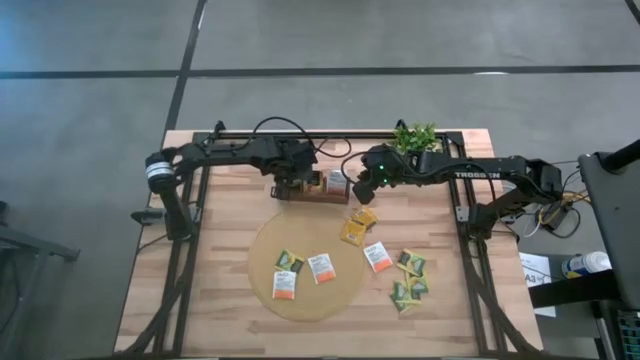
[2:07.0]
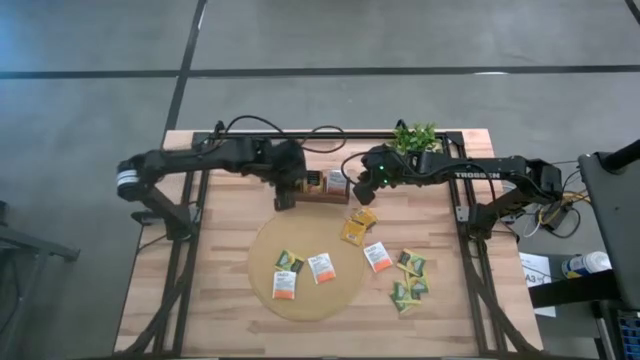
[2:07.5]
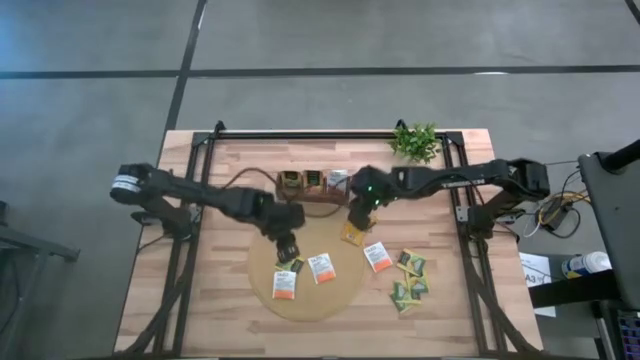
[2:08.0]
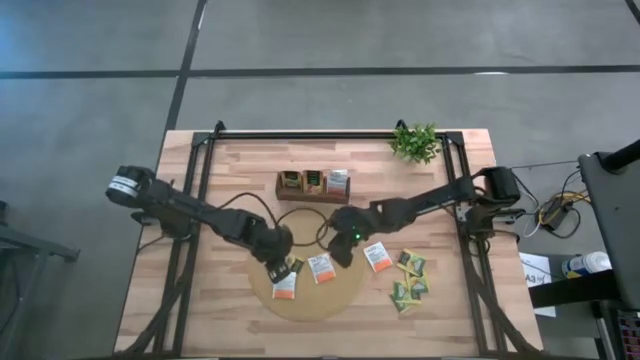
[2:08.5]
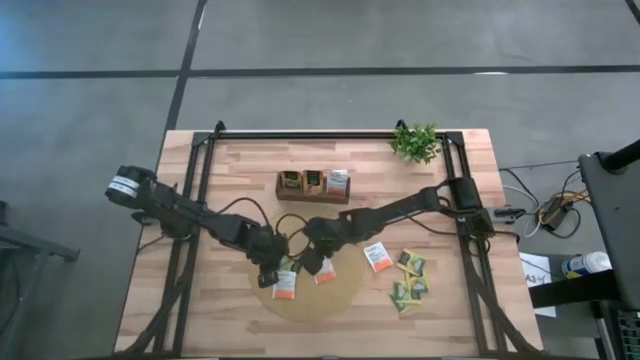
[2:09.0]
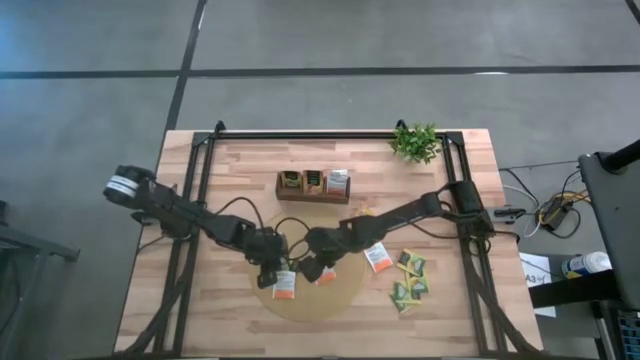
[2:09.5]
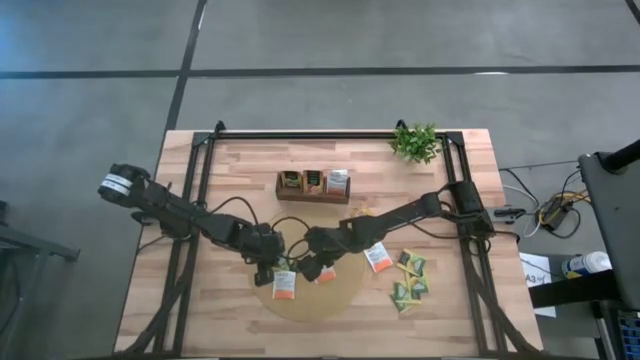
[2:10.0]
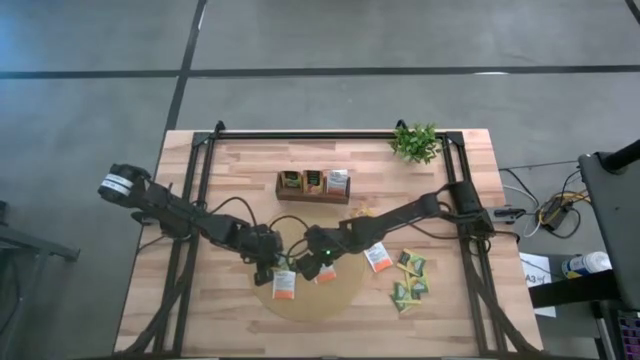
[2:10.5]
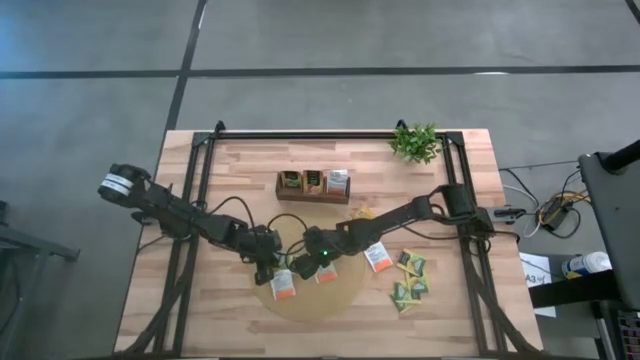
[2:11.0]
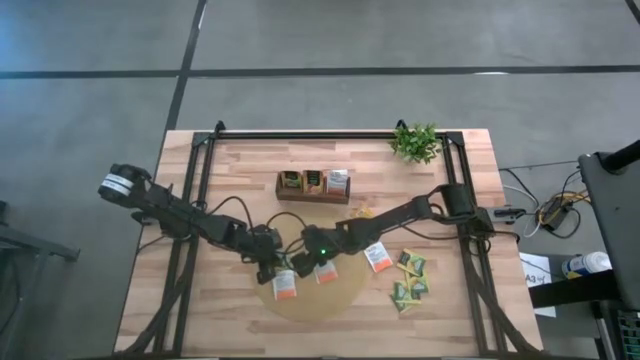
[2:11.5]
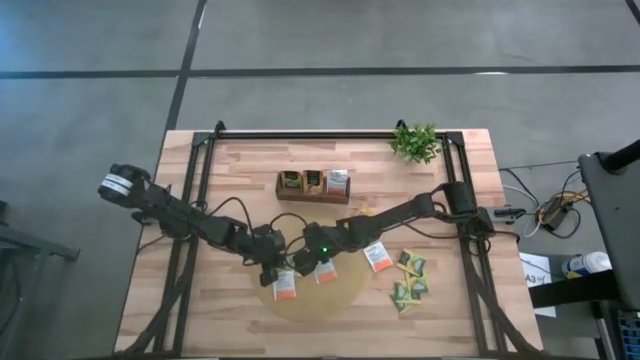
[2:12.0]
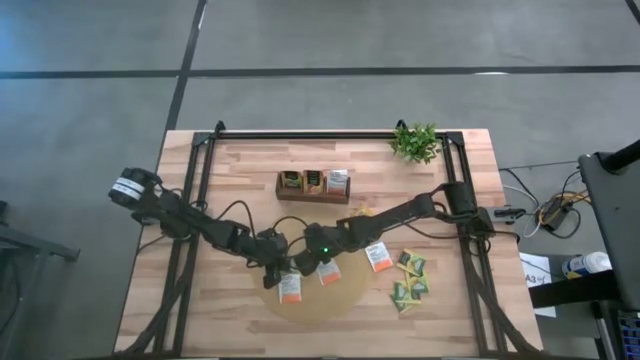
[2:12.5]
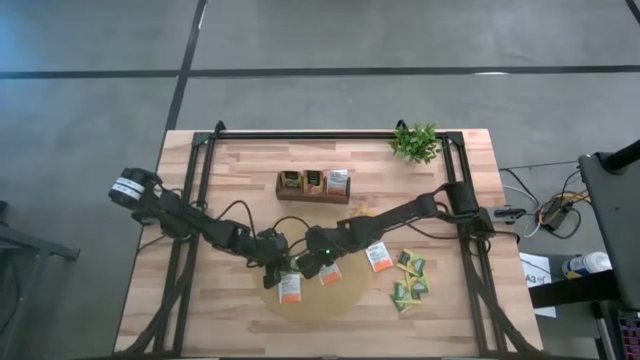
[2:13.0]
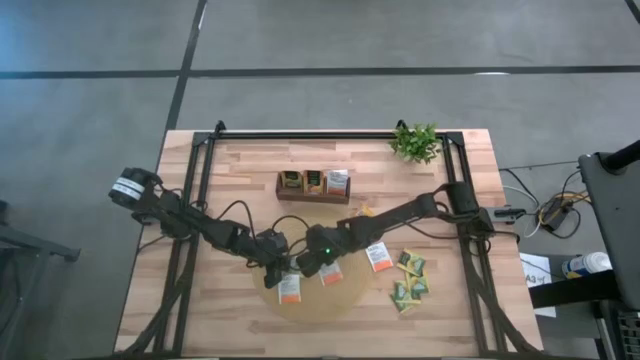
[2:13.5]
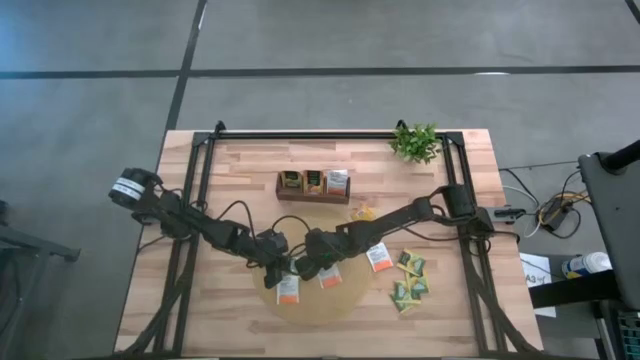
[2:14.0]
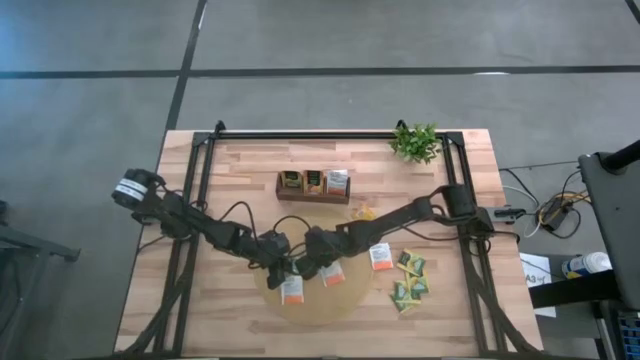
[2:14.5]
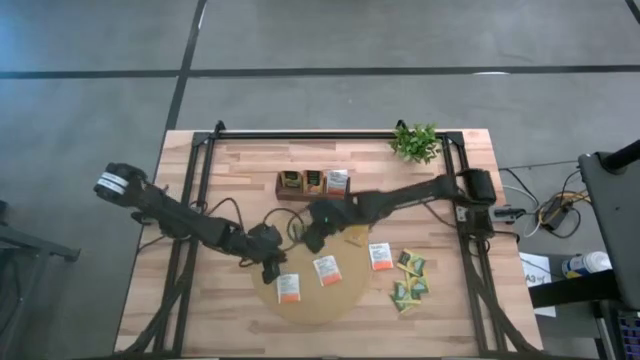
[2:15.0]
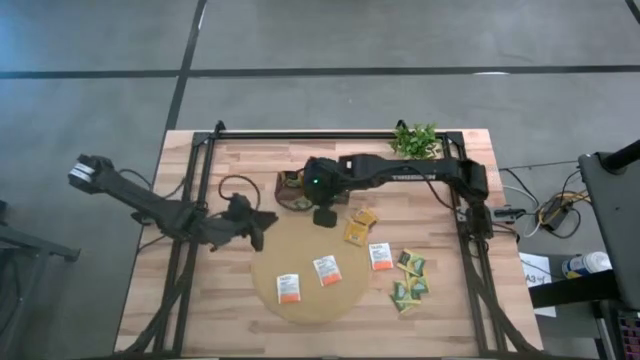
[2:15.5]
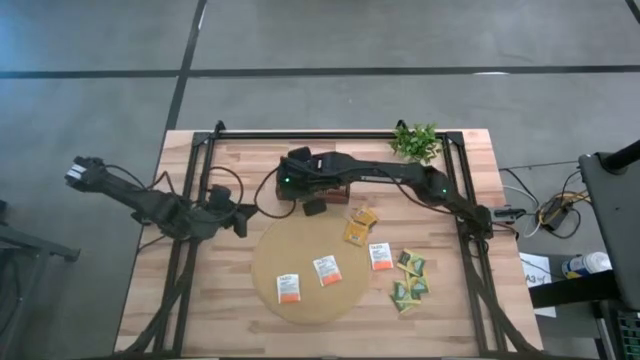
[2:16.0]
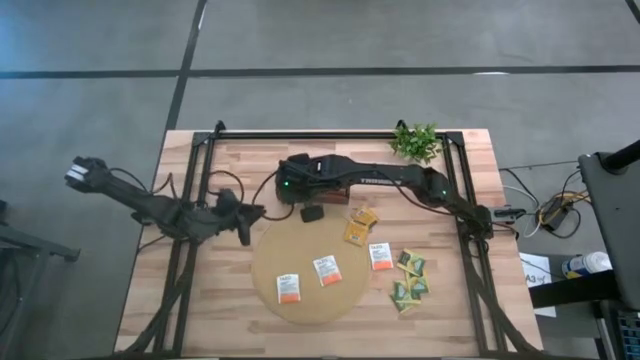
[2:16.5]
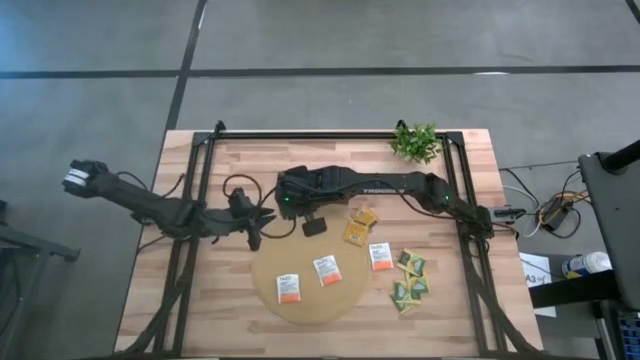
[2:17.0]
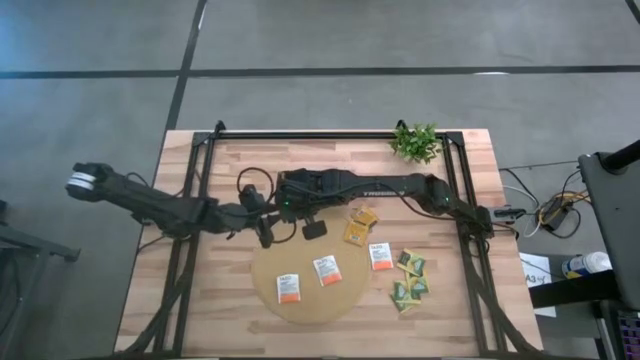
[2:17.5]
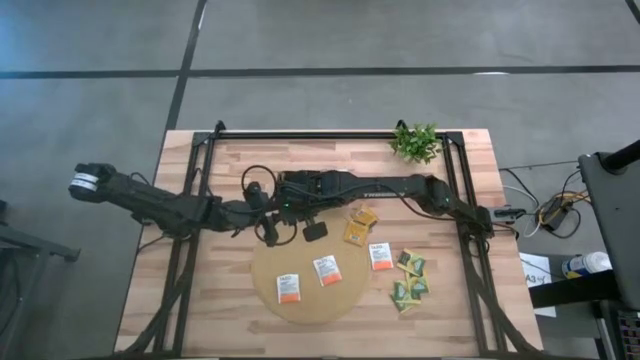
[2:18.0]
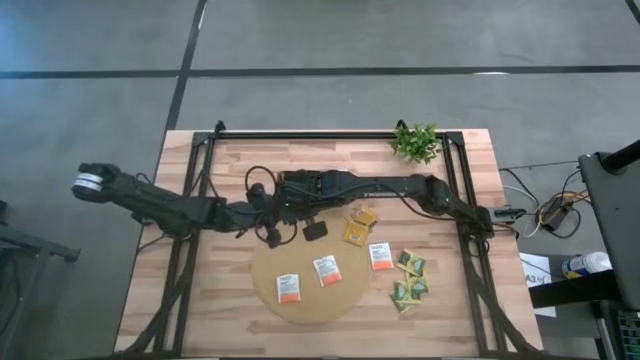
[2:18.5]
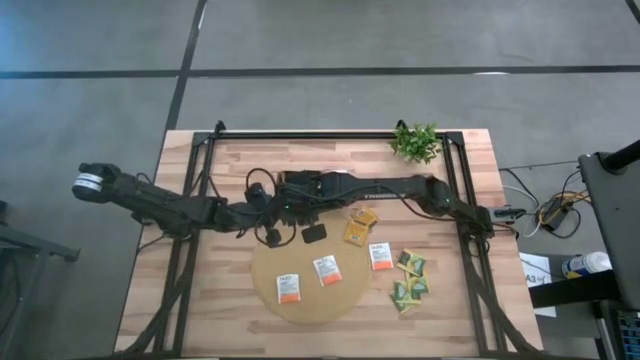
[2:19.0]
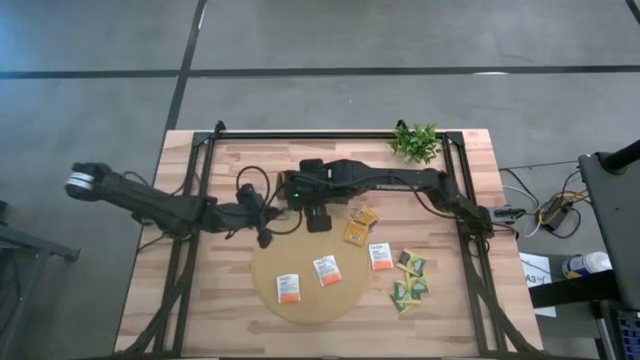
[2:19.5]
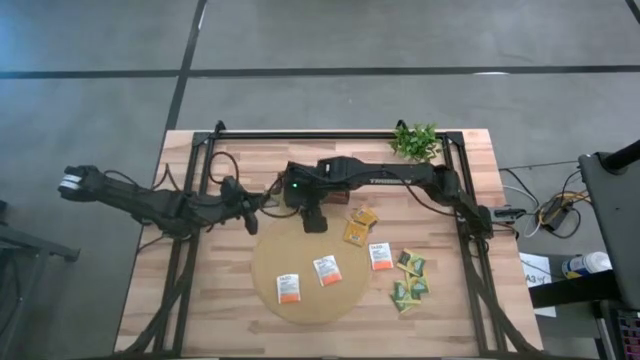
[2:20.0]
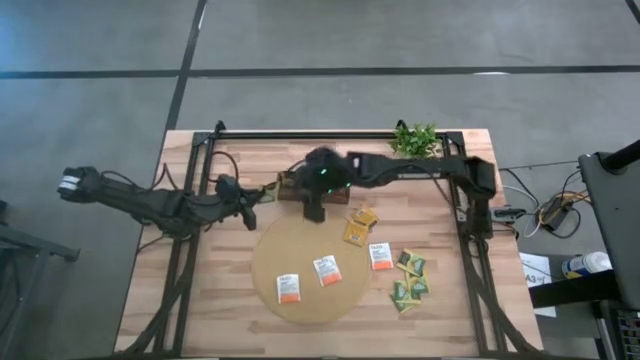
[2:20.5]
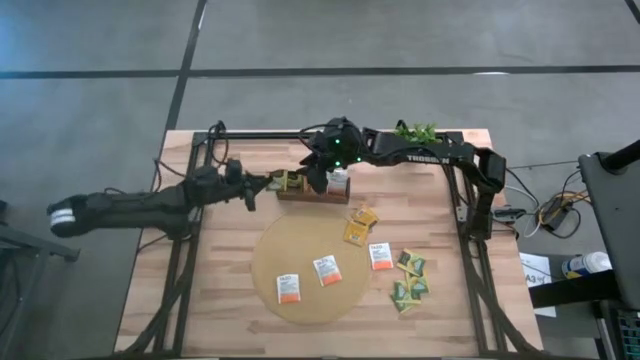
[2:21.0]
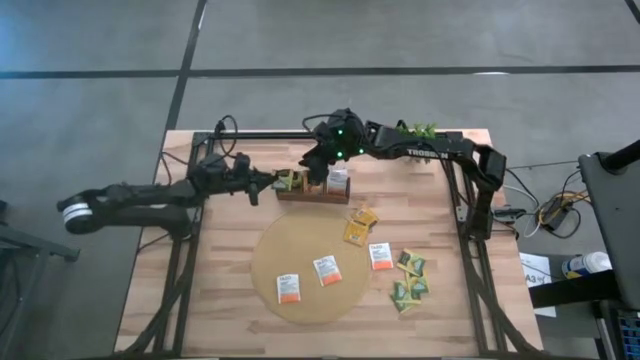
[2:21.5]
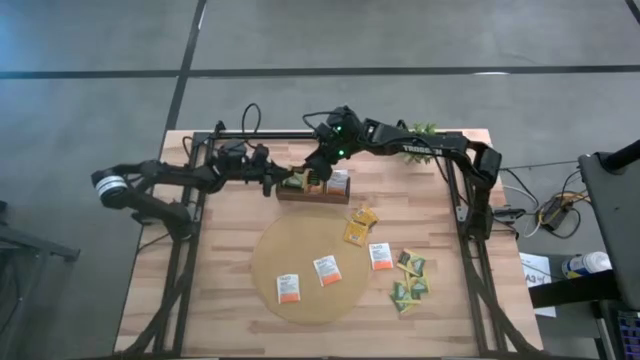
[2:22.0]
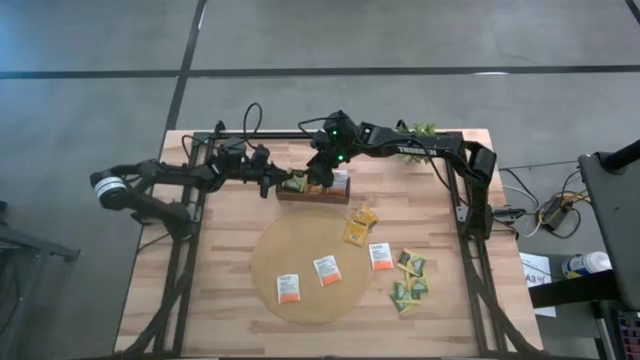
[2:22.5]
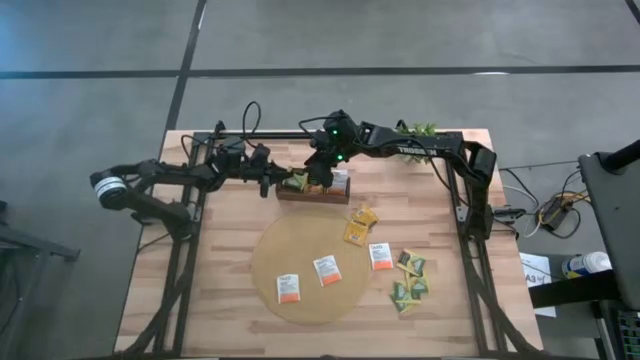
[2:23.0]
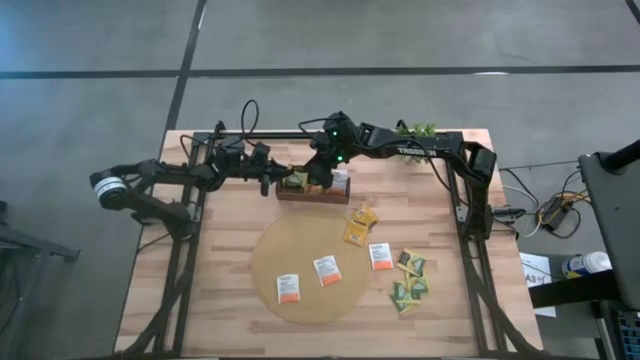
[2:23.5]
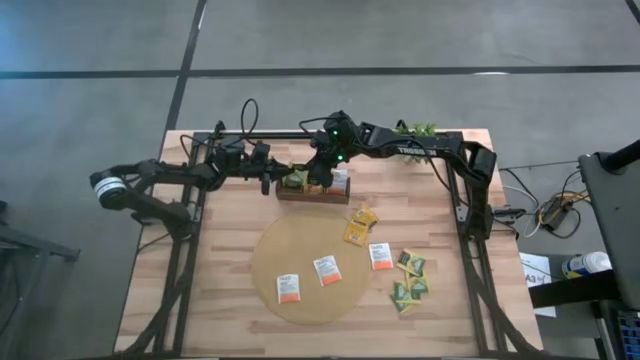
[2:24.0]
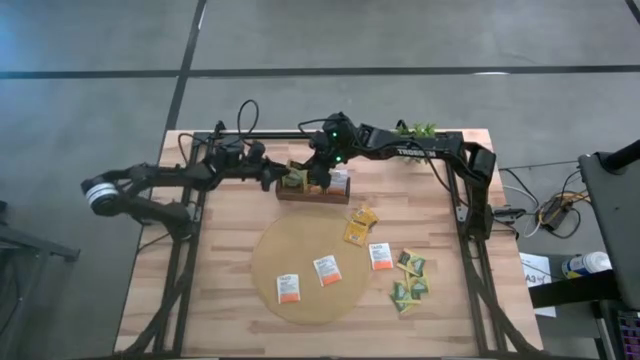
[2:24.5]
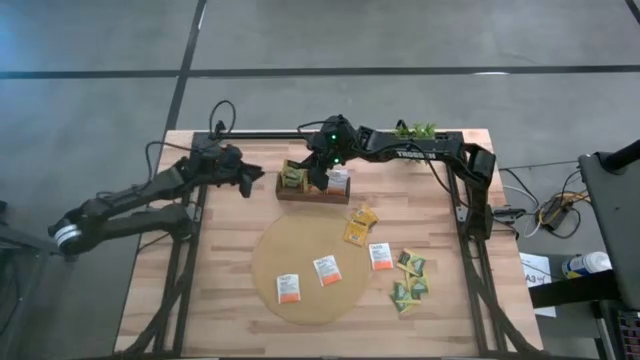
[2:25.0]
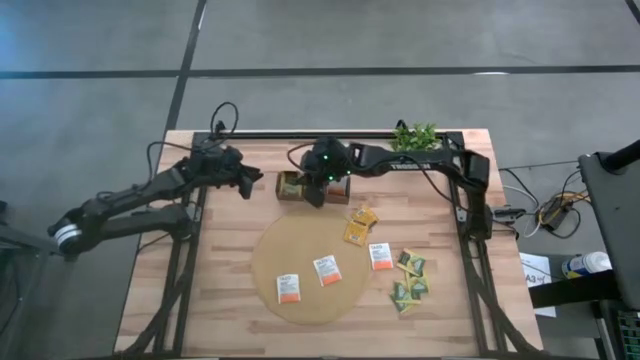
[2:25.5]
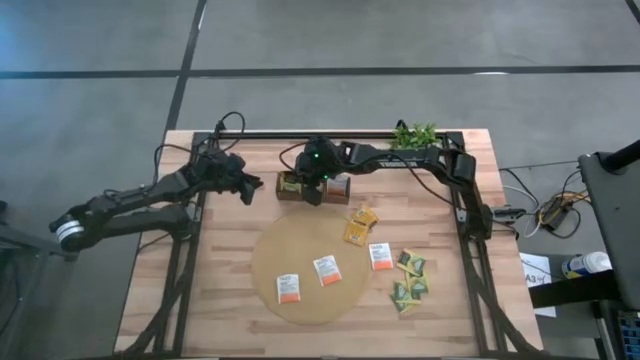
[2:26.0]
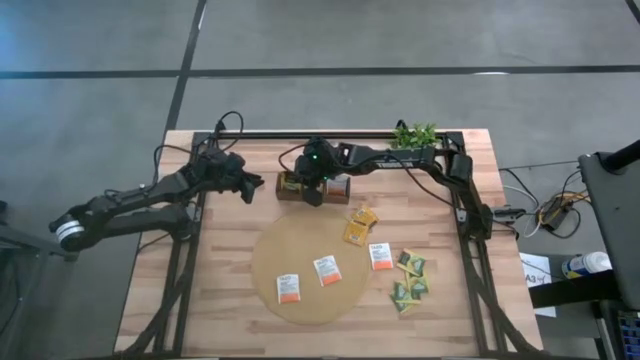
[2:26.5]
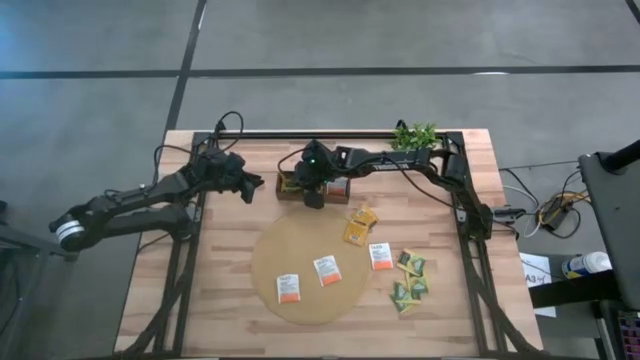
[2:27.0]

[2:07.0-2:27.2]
Task: Pick & Place Tea
Put the green tea bag into the left section of the wooden organizer

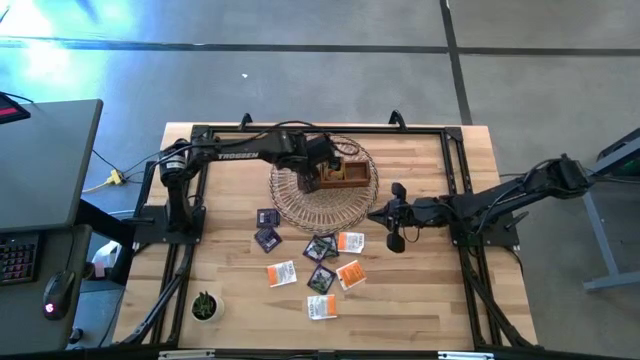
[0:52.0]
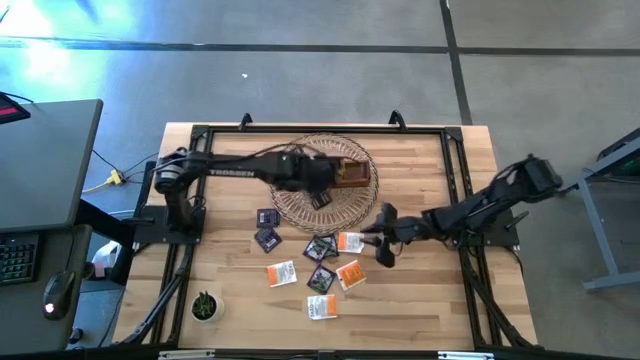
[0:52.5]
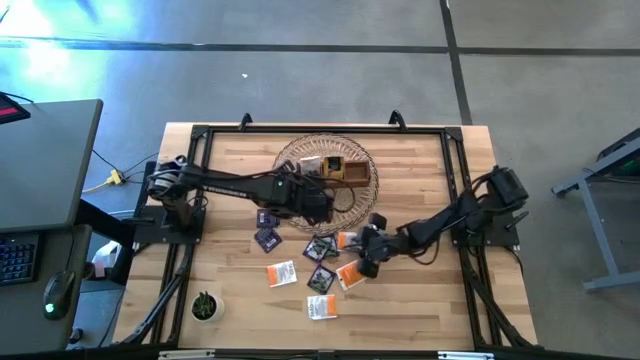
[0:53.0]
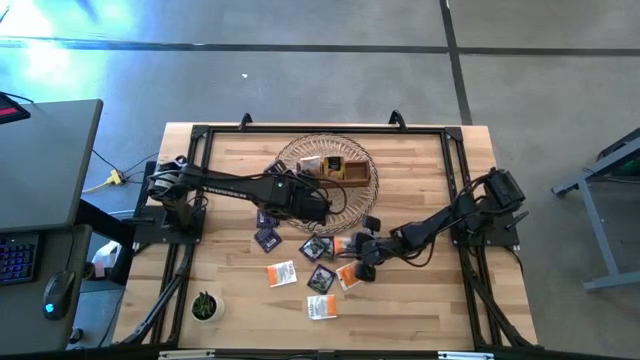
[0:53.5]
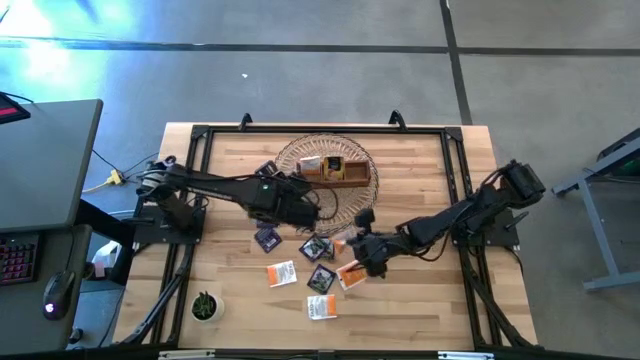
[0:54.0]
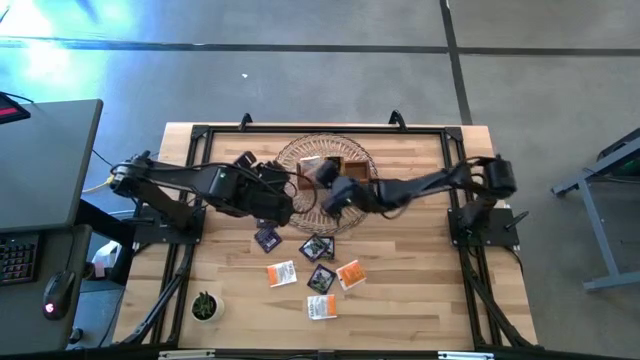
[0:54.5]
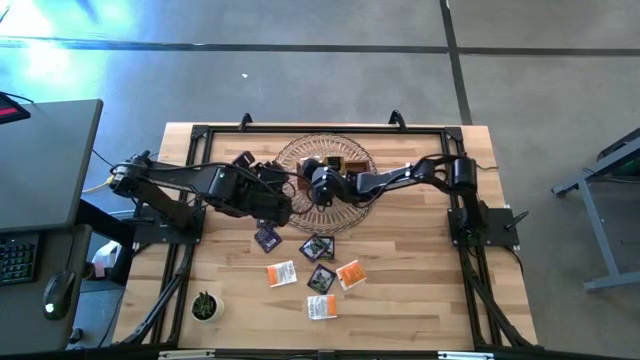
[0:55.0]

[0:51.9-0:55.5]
Task: Pick & Place Tea
Put the white tea bag into the left section of the wooden organizer
